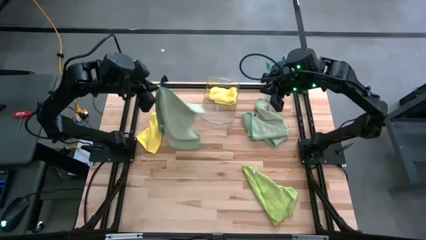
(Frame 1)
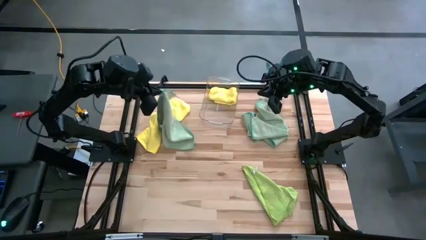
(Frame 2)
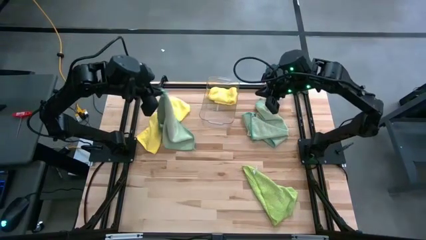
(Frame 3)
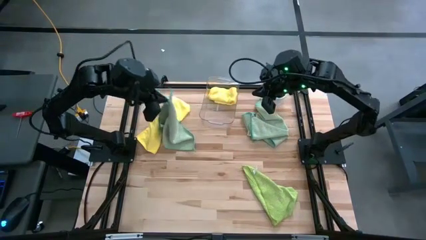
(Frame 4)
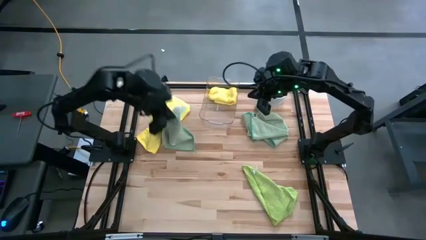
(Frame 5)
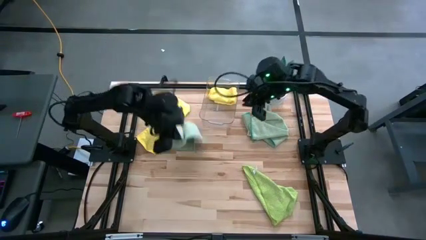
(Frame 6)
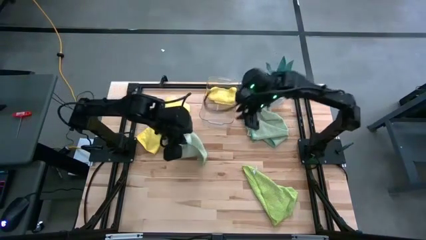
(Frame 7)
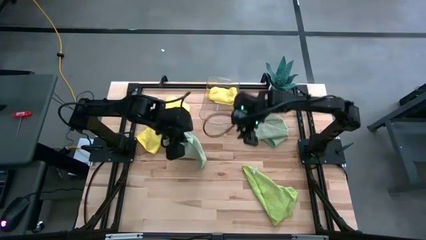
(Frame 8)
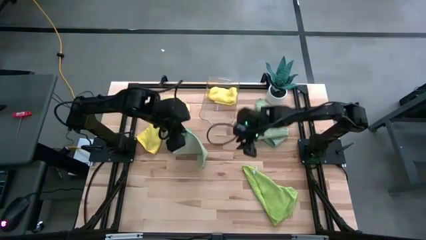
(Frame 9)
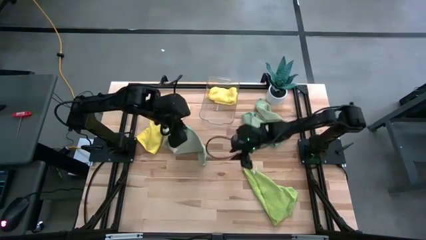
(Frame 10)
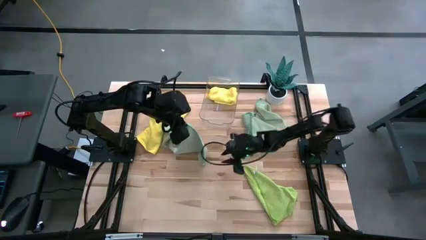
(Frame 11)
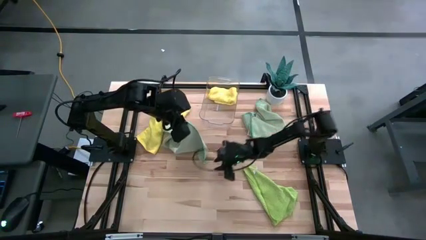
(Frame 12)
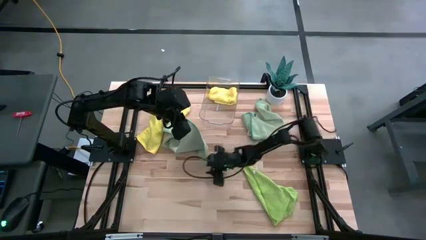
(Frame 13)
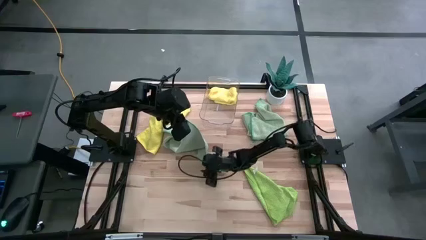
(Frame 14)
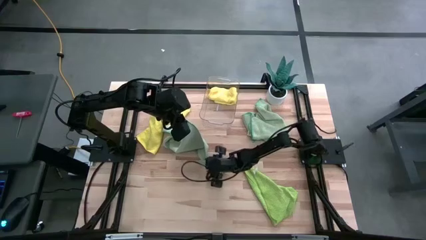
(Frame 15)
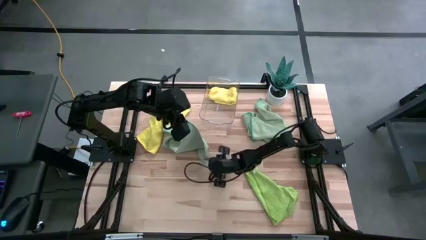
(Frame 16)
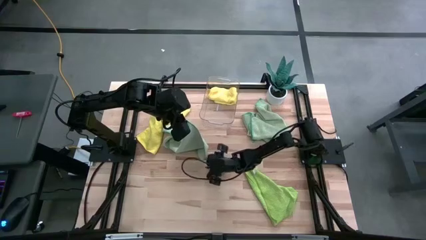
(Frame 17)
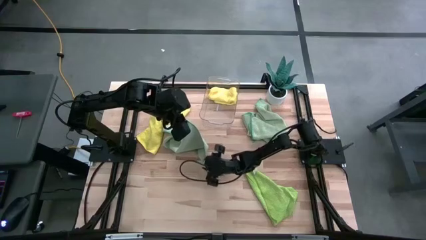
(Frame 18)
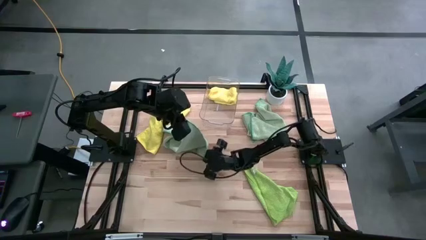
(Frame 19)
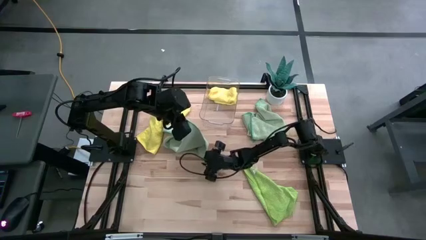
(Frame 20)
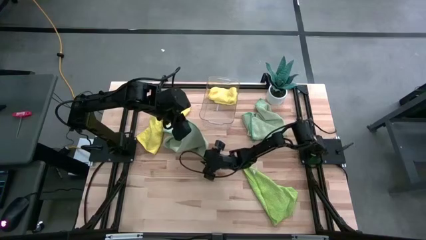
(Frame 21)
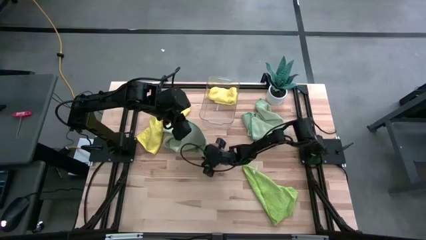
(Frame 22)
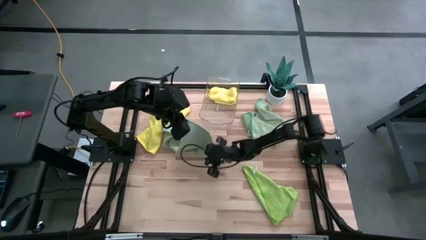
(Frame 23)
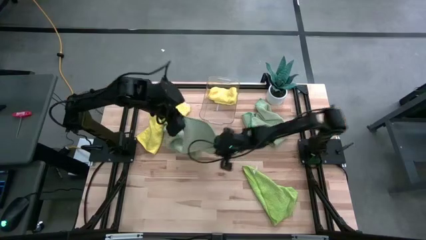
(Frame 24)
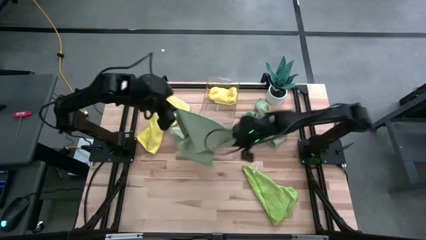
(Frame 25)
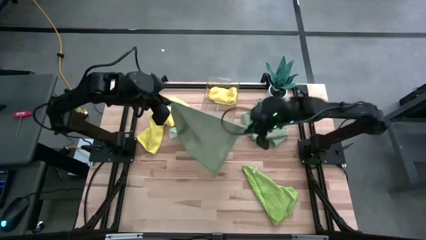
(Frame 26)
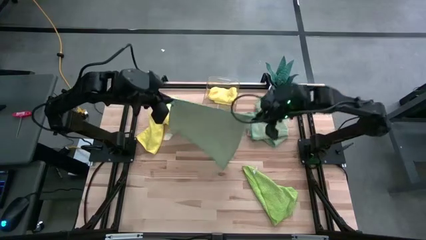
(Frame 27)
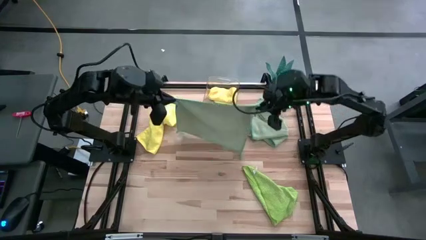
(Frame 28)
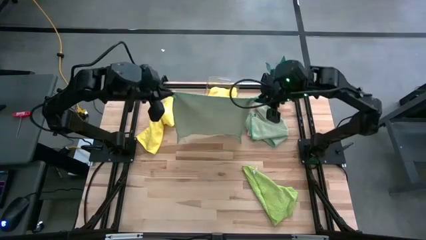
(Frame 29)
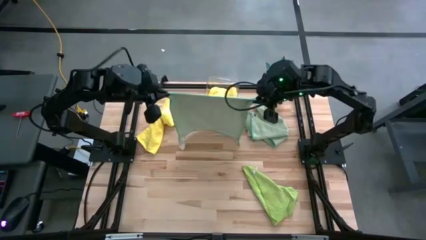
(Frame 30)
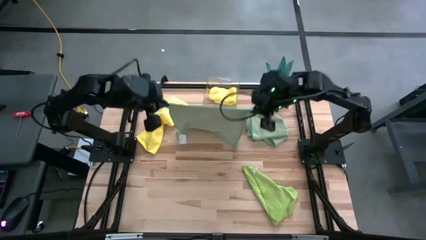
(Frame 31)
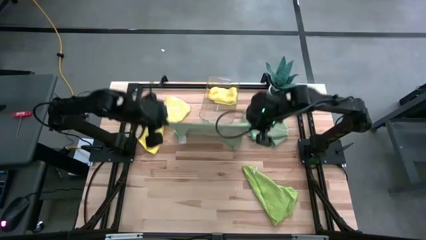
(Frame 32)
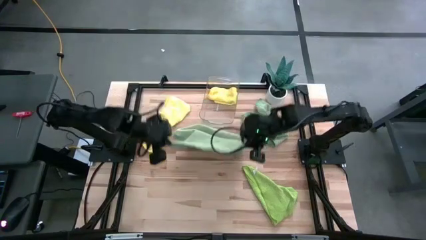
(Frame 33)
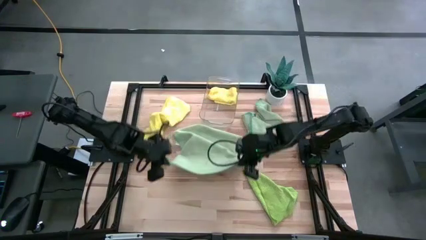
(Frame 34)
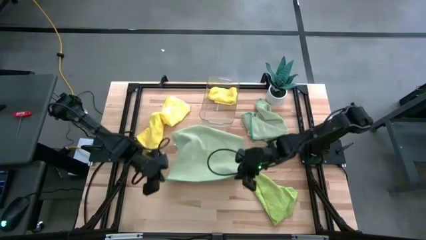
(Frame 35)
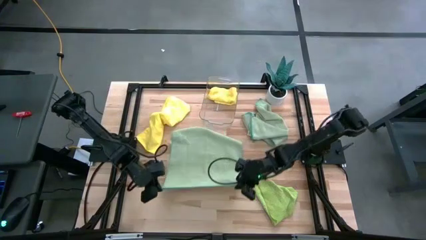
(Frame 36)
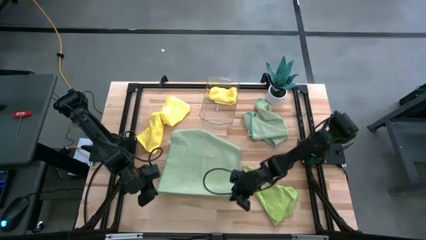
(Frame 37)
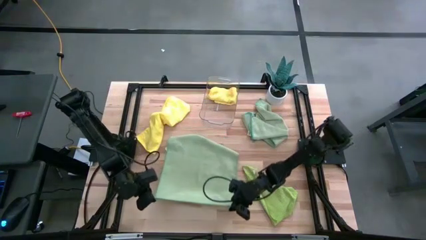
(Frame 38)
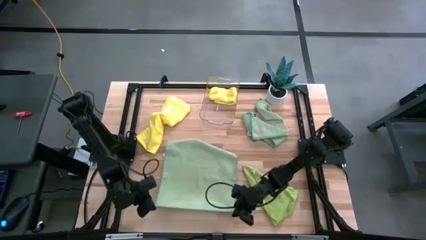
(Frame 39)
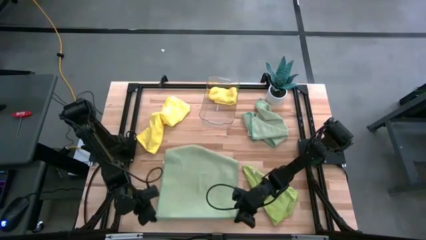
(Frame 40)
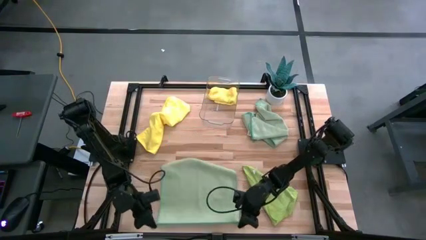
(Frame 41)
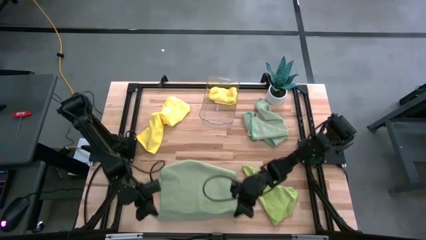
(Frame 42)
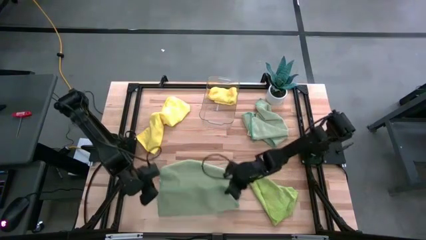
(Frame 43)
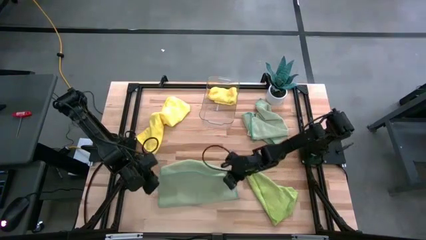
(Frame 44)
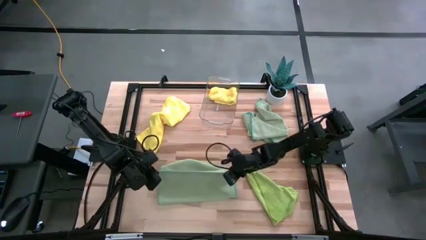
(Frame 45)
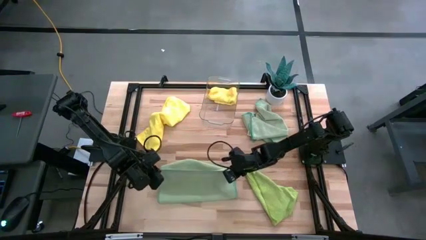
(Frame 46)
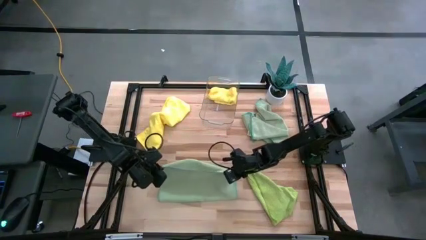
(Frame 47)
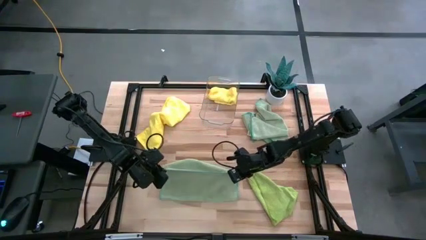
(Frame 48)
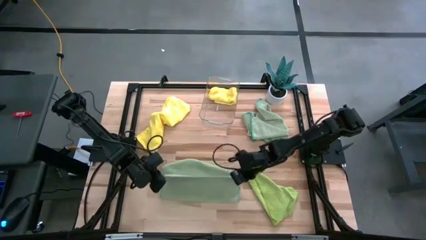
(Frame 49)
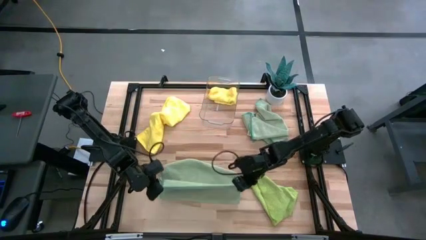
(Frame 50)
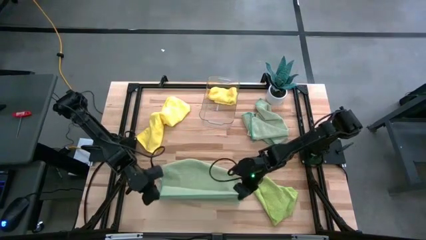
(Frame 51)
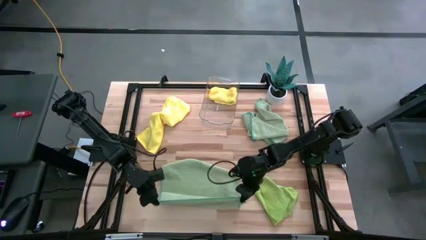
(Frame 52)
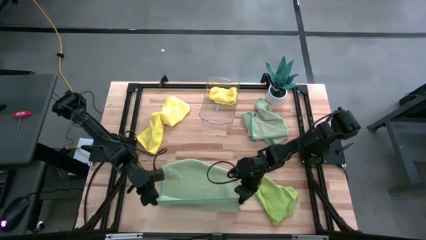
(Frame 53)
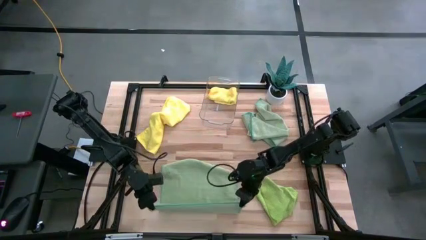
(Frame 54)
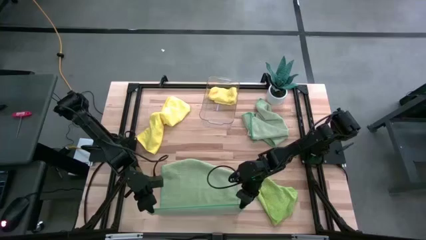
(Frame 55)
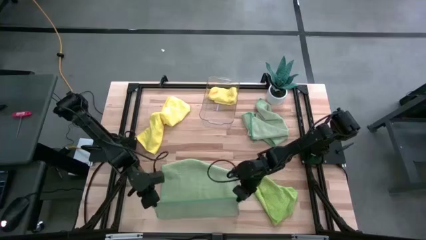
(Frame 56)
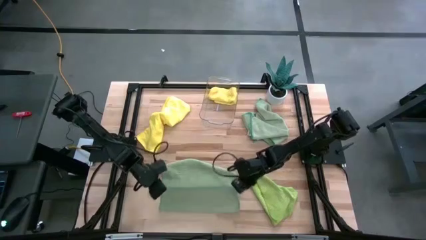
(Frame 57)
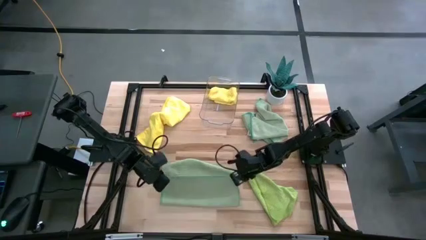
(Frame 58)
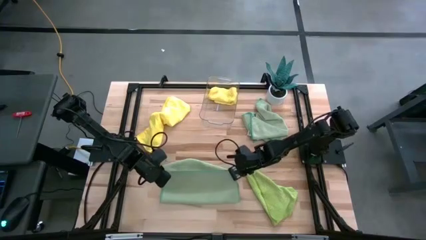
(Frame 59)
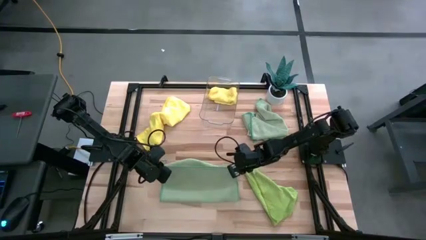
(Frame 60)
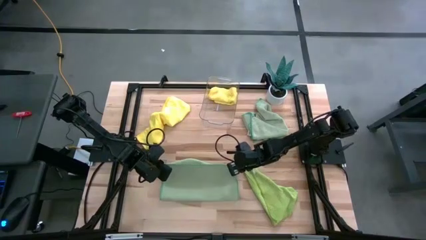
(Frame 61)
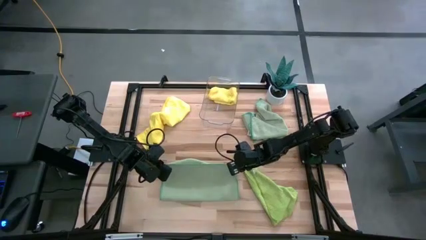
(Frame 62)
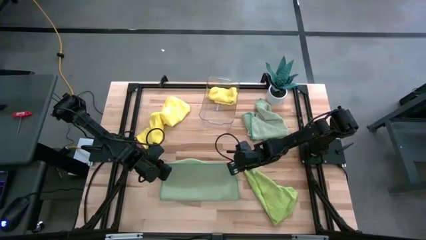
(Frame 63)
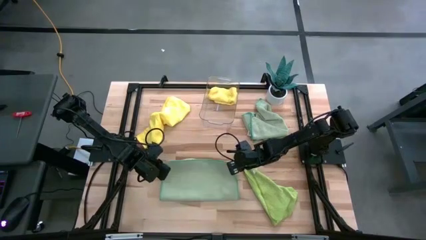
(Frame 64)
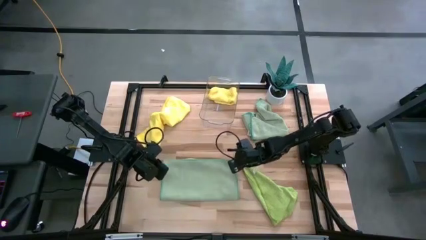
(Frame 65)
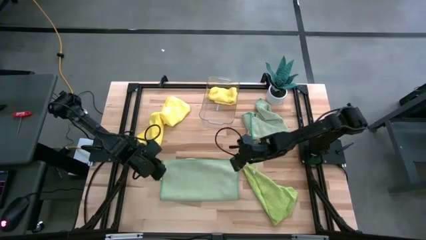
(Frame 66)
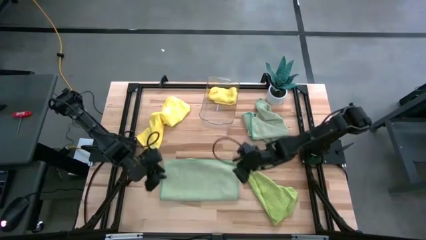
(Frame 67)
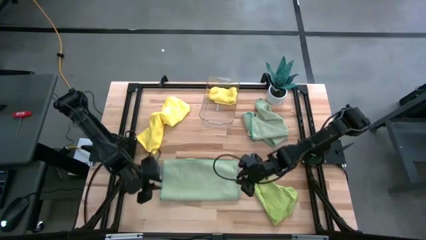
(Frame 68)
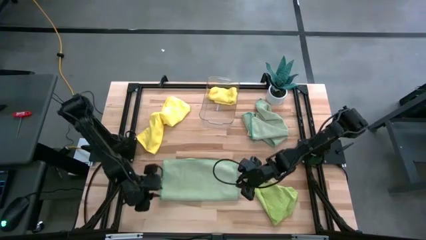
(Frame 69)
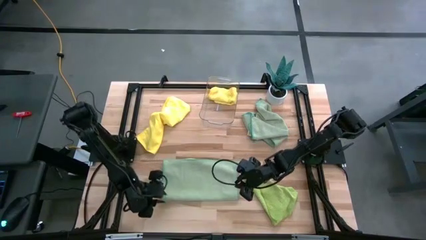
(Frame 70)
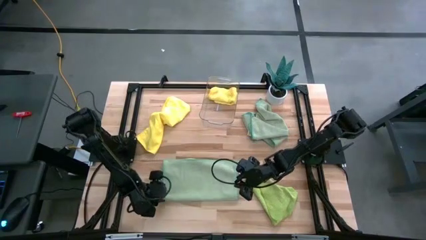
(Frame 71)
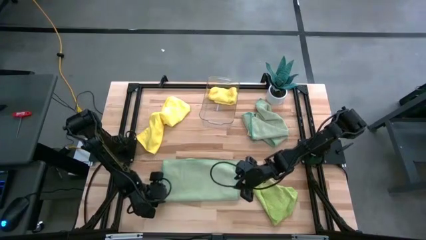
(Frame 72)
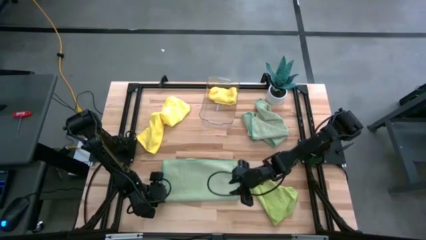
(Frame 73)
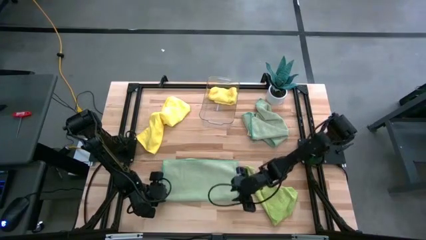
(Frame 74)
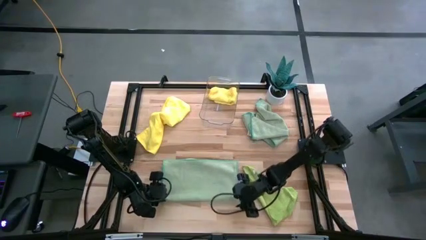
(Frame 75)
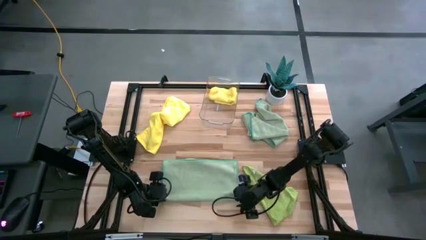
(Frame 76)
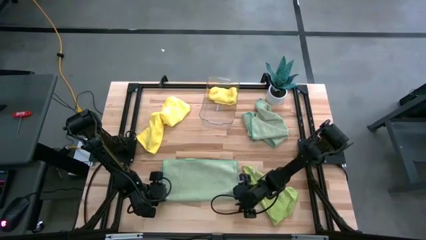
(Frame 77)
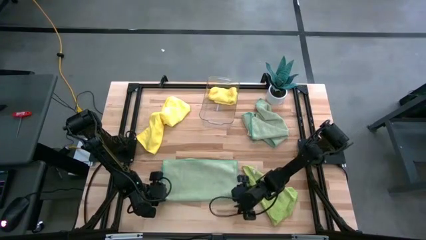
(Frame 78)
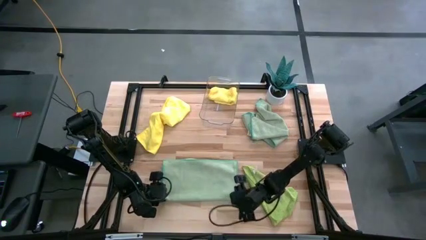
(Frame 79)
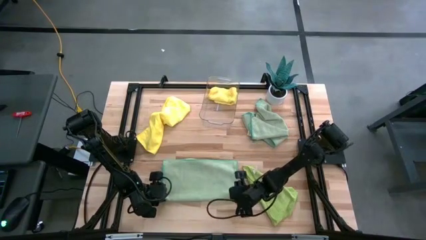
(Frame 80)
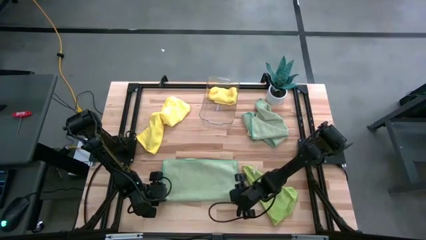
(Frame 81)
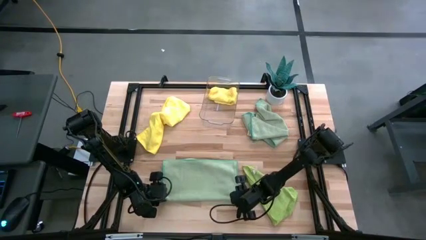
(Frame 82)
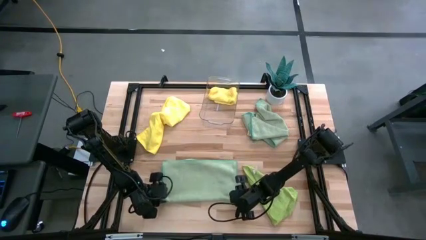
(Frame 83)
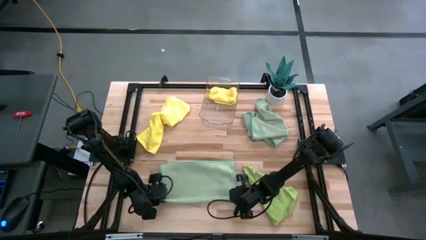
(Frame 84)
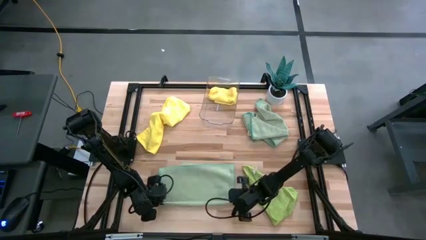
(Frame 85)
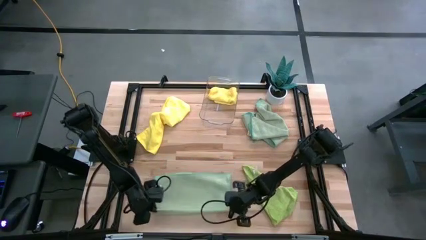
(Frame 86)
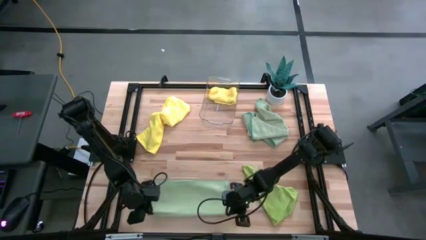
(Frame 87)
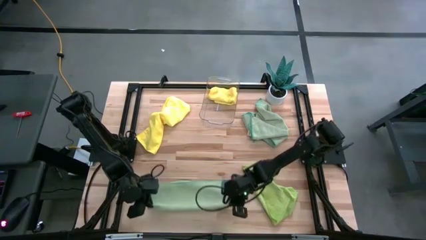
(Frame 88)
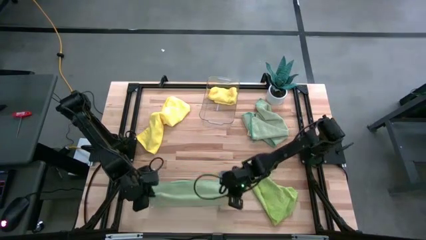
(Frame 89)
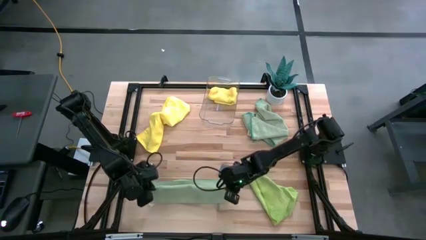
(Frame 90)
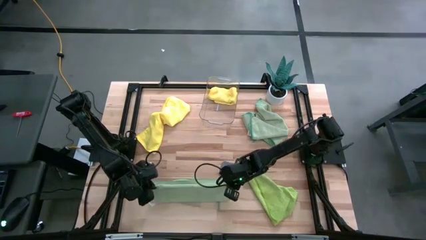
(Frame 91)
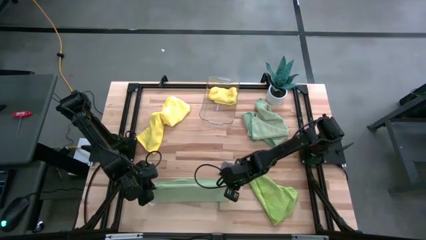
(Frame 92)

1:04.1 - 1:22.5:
Task: Fold microfiber towels
Fold the bottom left blue towel
